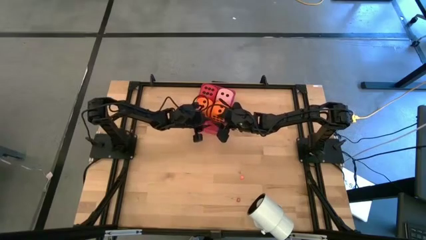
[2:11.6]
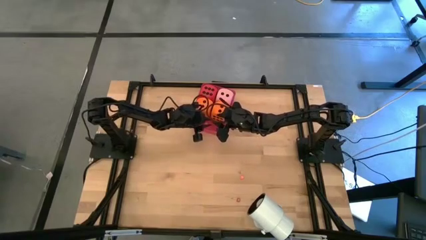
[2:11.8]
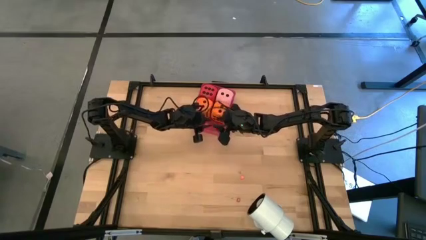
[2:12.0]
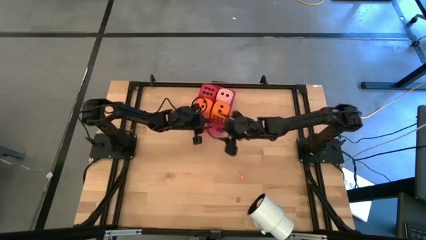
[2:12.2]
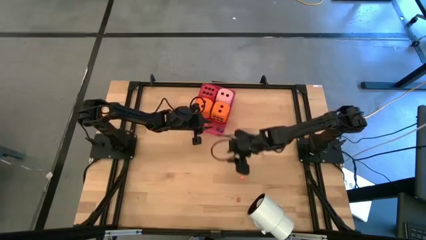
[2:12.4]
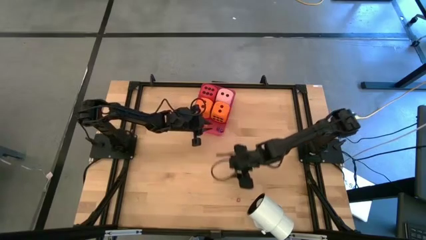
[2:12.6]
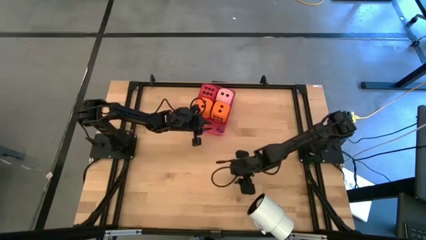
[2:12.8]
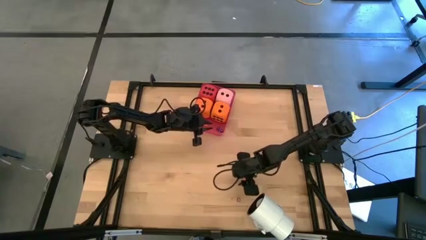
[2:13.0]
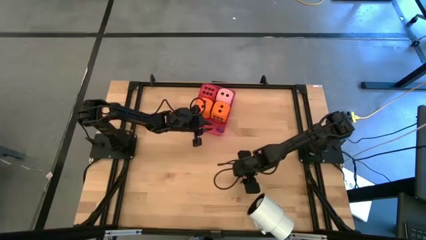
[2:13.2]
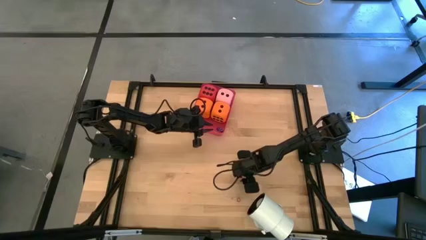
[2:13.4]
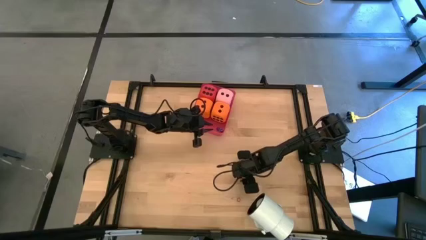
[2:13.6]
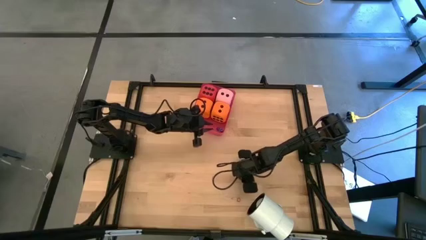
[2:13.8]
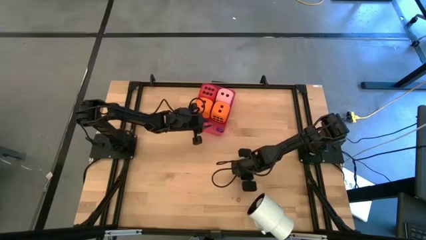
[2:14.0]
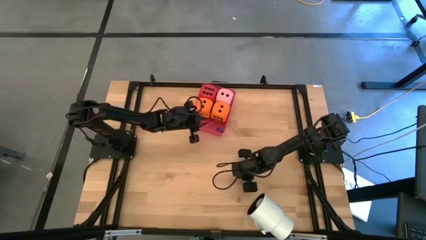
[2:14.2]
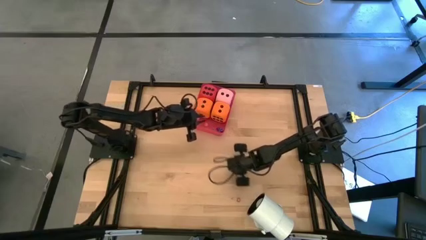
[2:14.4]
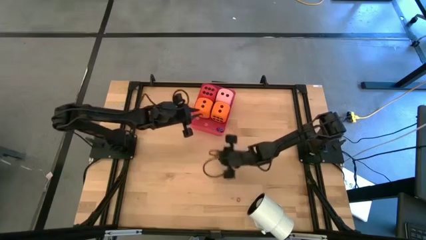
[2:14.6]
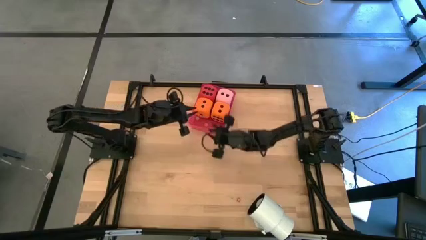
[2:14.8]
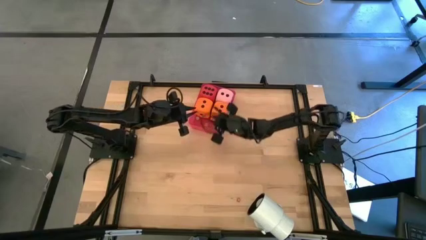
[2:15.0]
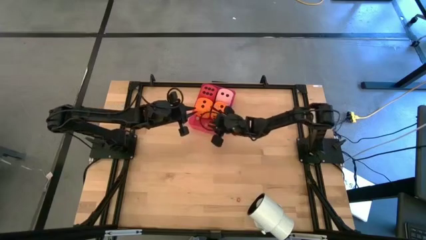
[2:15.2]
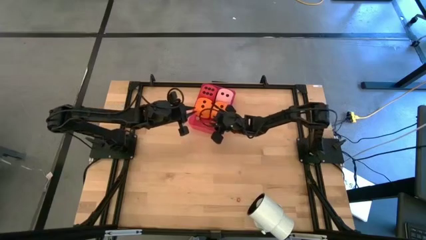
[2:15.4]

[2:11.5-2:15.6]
Task: Pick & Place Dice
Put the small orange dice into the red bin

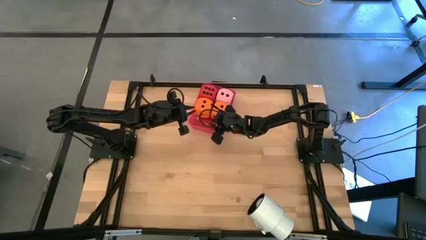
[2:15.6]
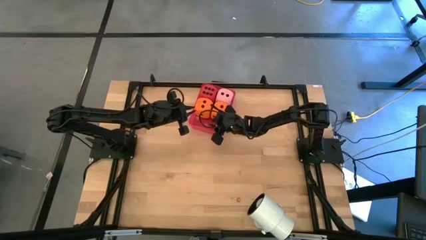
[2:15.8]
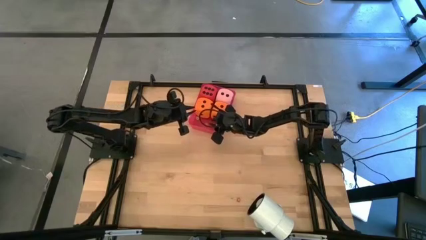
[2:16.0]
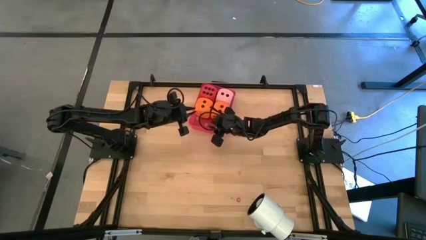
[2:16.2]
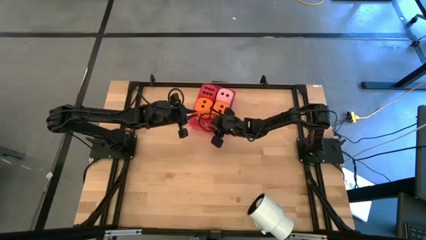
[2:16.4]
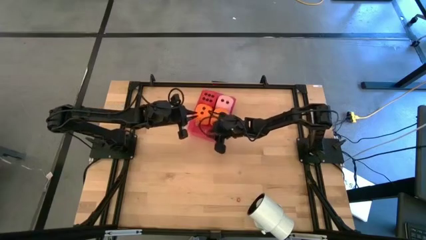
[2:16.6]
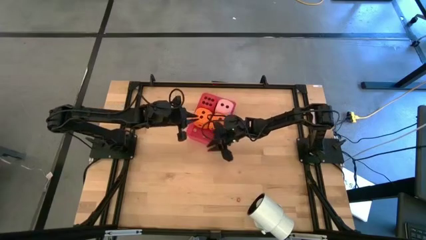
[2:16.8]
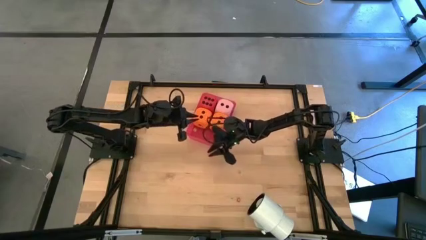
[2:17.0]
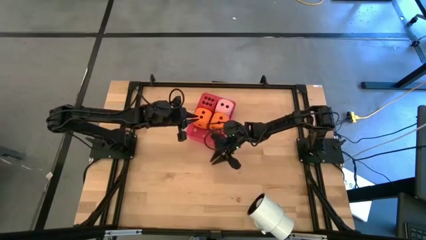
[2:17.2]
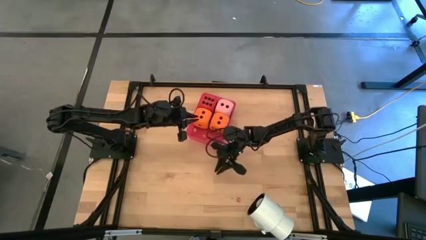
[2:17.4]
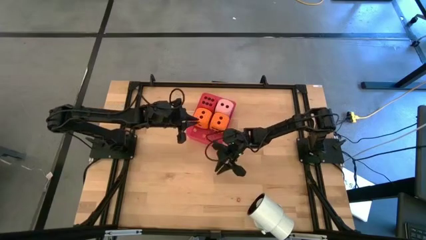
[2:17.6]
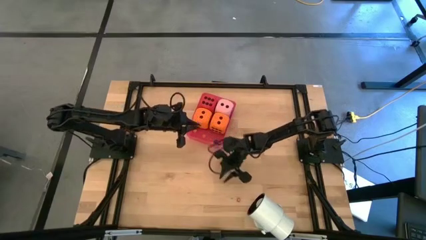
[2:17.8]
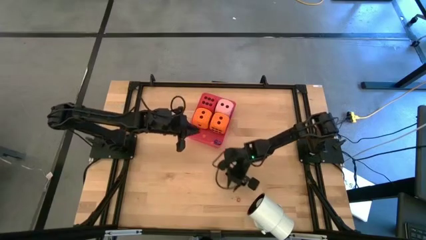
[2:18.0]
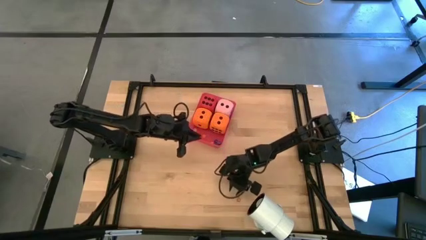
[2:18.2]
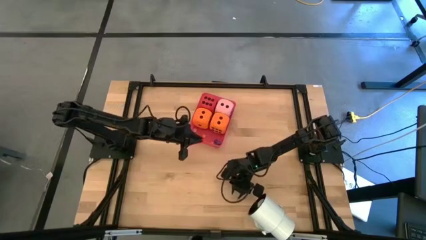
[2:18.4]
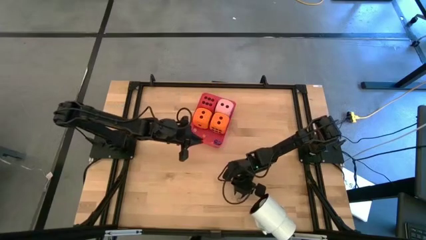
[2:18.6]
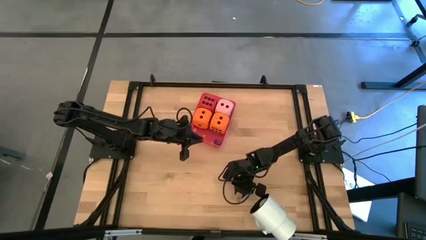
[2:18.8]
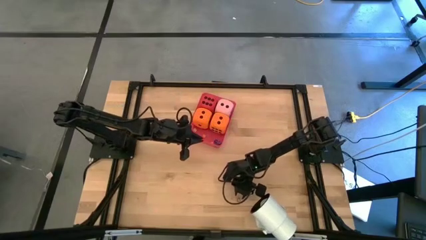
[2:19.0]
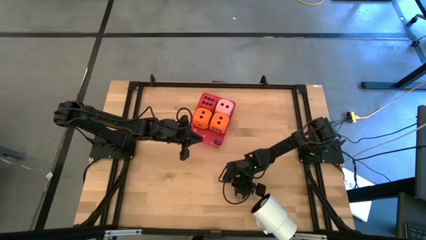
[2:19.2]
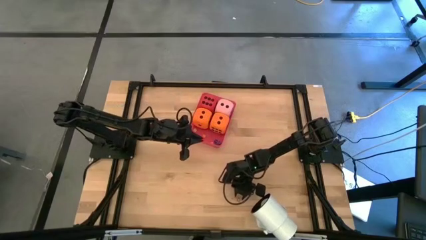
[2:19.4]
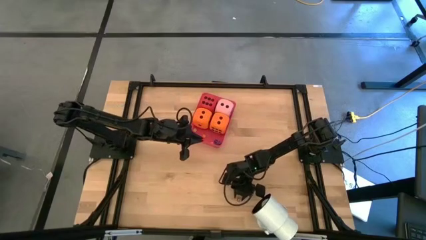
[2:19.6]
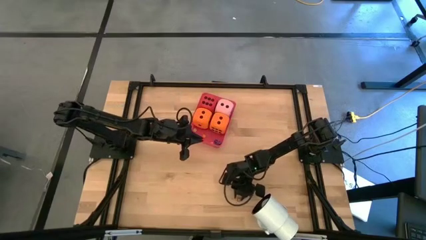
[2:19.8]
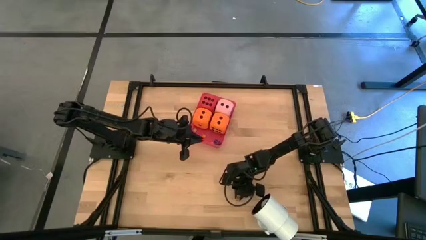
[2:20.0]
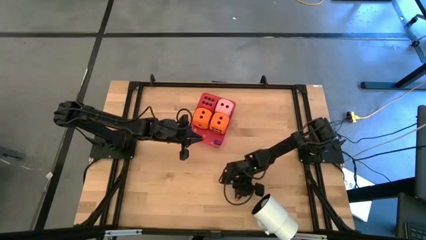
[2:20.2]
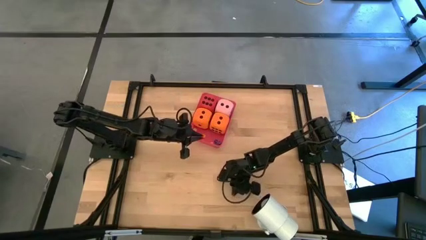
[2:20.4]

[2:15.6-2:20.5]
Put the small red dice into the red bin

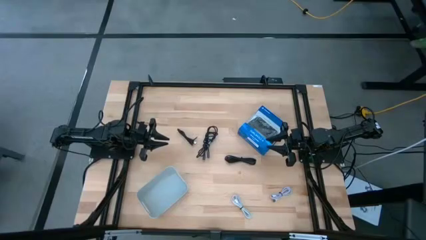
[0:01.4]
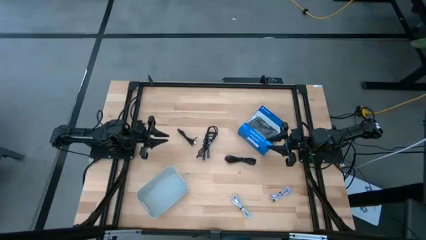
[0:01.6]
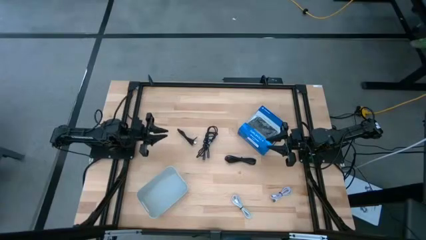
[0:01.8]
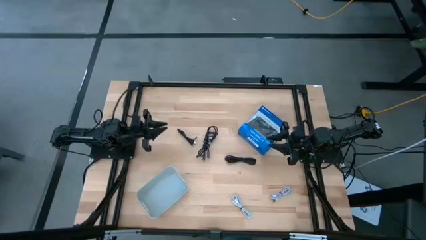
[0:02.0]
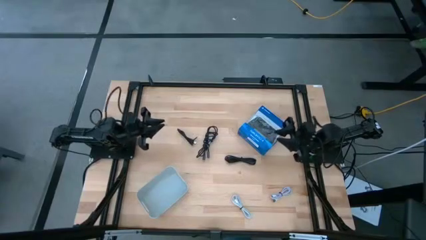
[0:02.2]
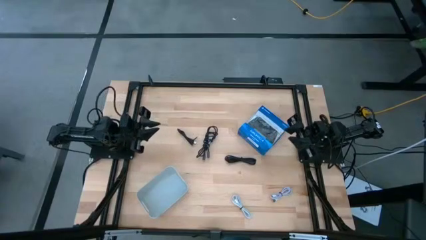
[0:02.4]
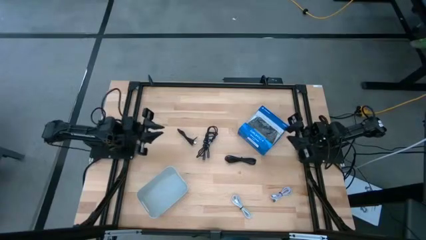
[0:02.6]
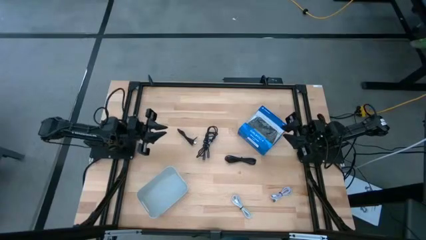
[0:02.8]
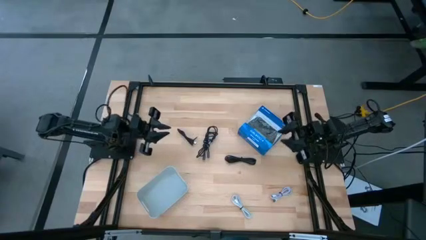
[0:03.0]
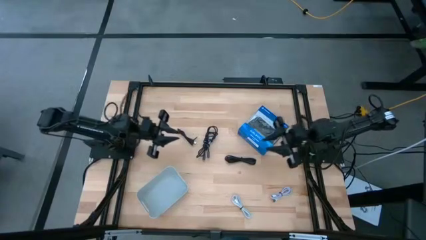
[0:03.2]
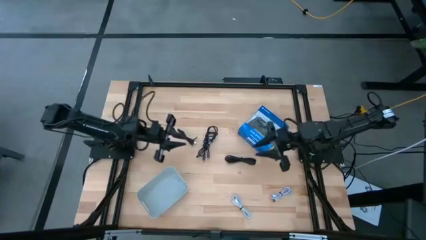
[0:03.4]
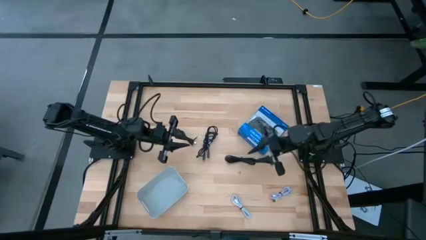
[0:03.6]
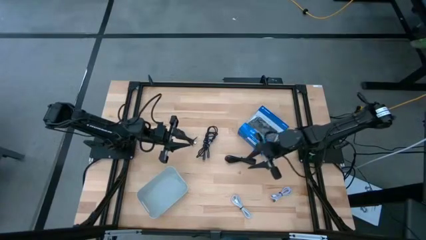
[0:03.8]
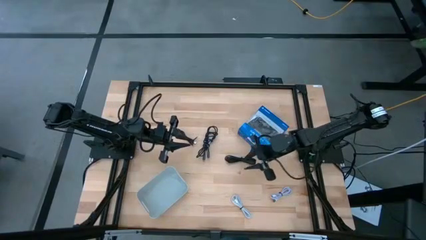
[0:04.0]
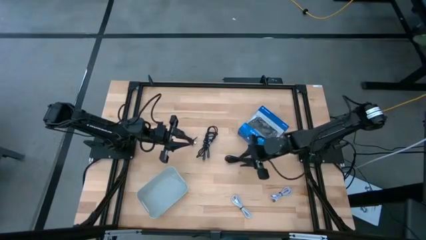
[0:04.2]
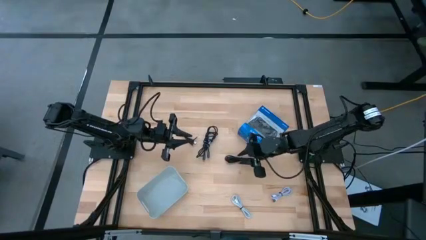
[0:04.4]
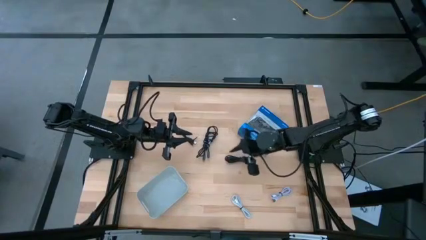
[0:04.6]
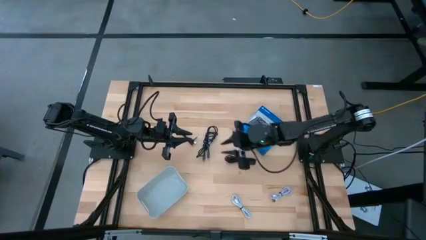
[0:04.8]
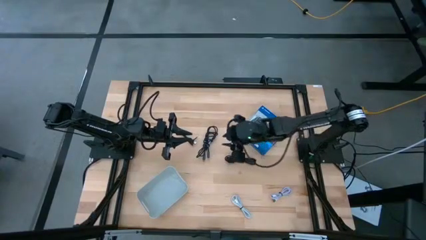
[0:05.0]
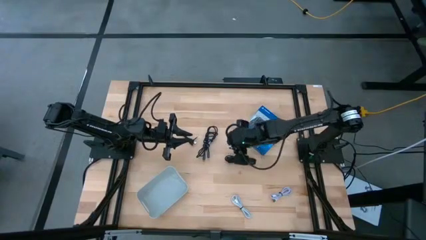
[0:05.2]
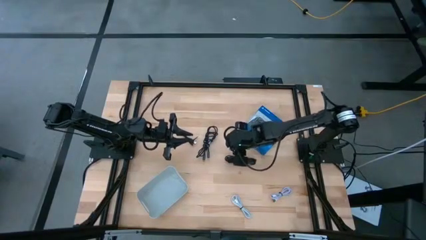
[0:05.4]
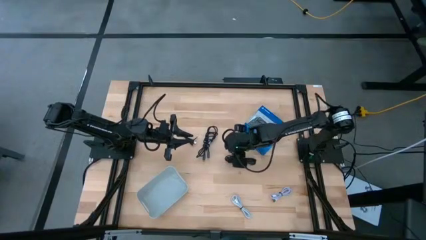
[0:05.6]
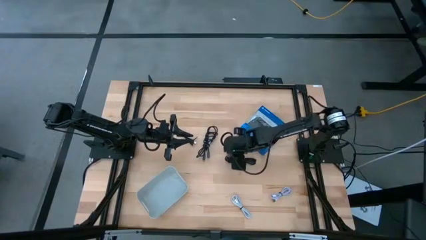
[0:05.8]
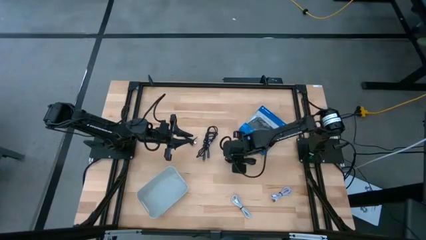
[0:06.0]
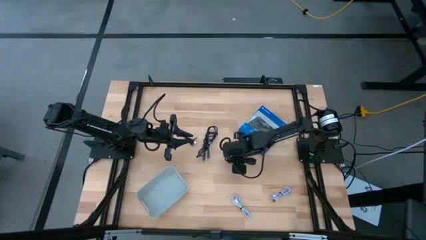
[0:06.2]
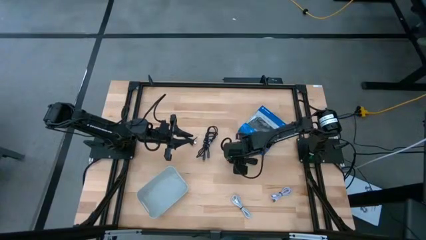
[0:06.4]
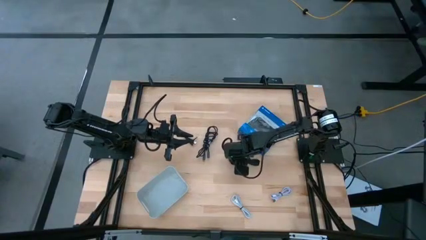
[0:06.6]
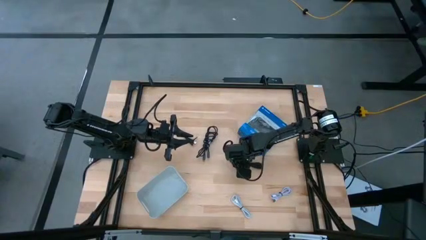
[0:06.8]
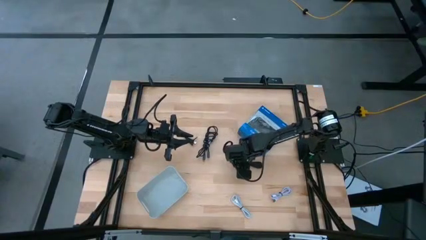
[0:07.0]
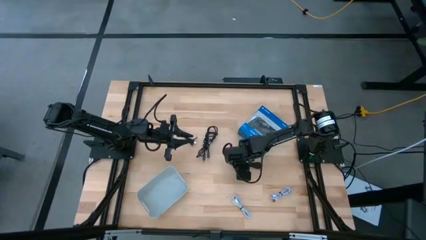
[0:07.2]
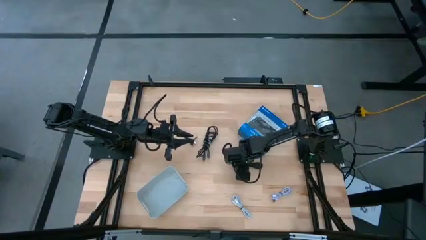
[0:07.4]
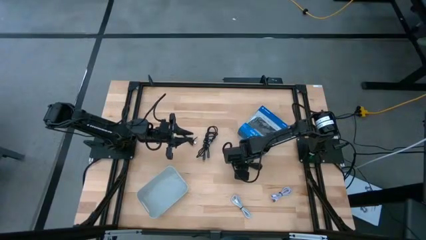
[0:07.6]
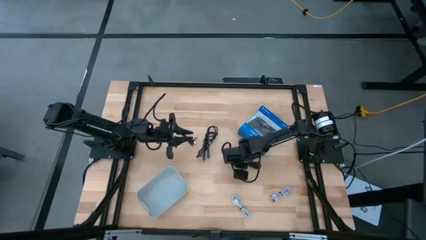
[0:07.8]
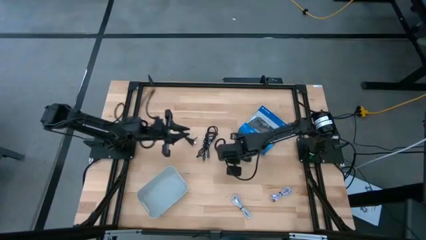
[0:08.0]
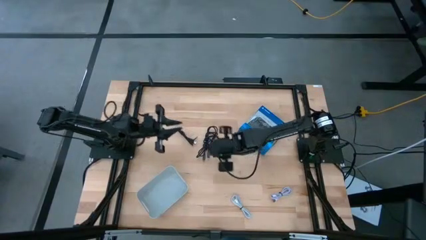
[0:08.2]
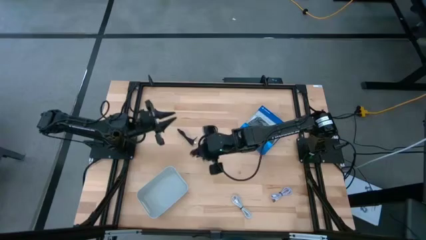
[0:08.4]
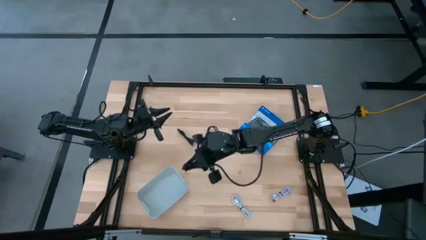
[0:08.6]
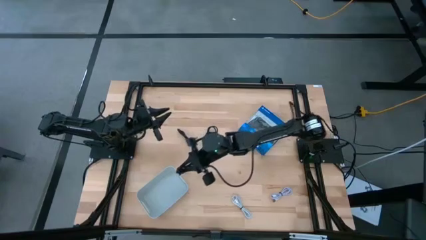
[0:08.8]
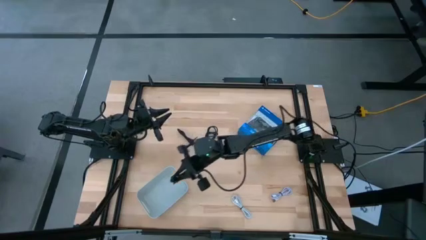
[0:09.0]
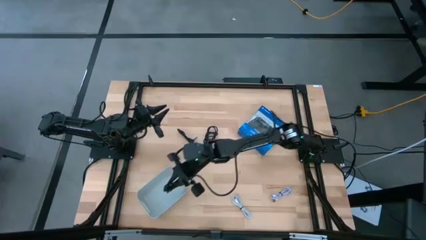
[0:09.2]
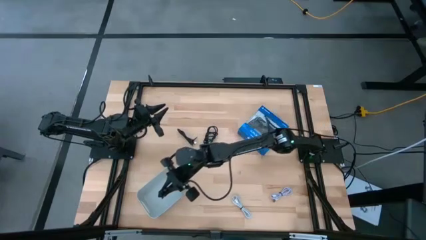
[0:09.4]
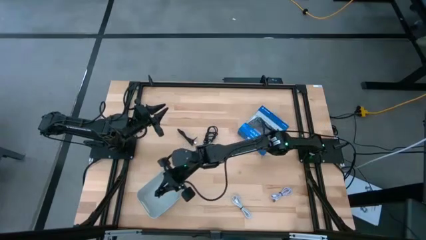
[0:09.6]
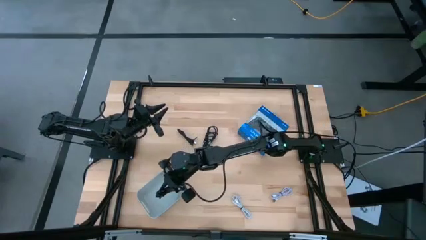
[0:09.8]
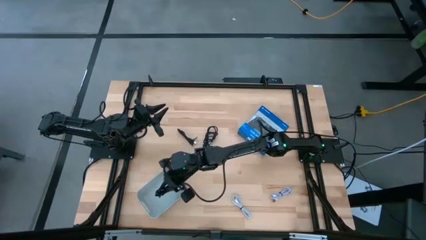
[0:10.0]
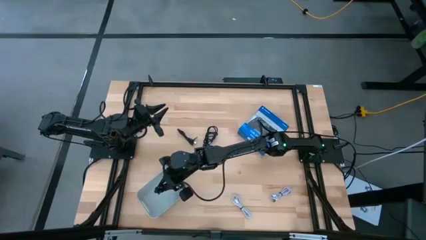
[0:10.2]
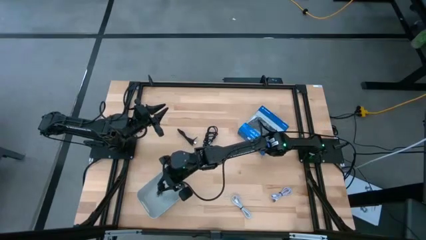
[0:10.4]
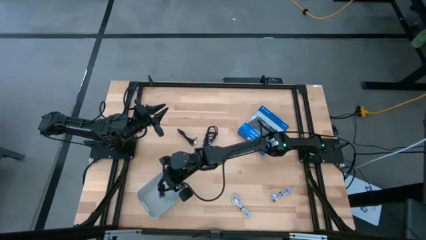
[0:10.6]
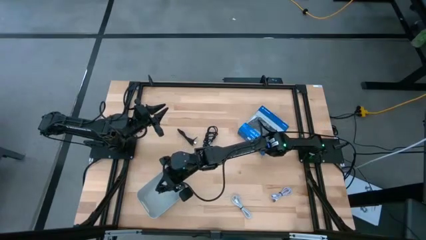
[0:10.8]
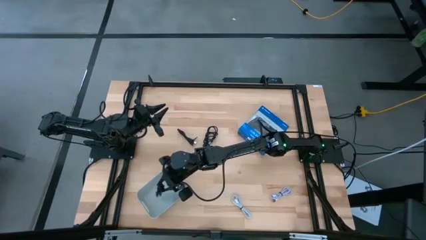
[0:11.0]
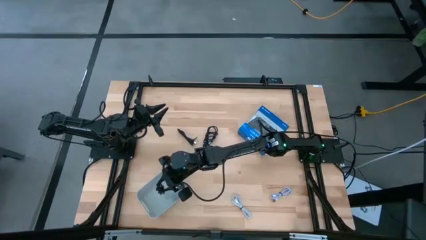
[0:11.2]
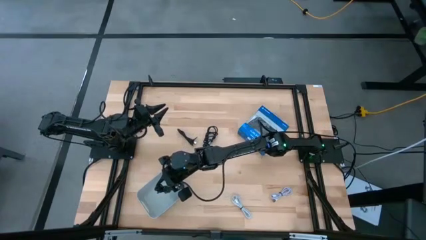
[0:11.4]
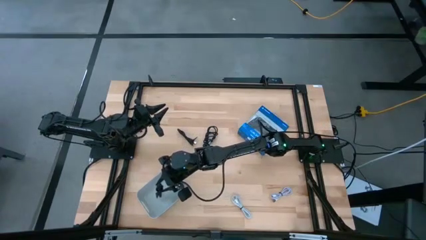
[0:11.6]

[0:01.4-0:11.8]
Task: Pick and place USB-C Cables
Put the right black charger cable into the white bin
